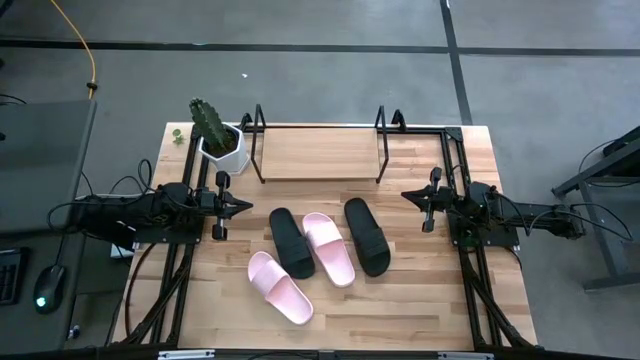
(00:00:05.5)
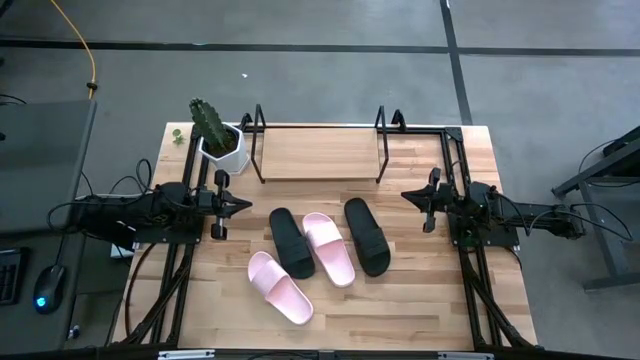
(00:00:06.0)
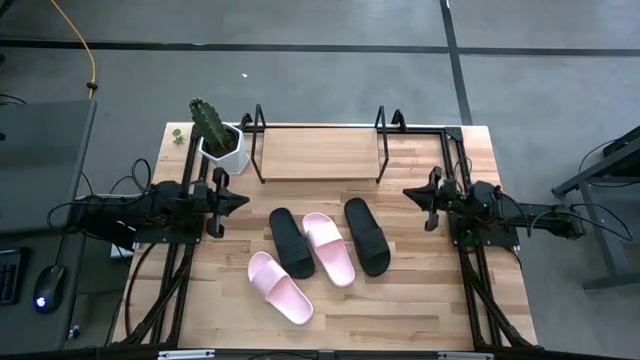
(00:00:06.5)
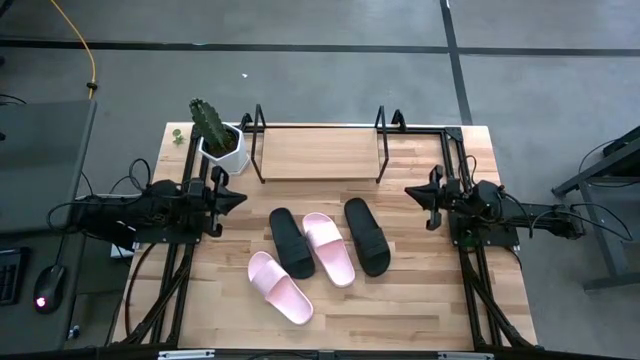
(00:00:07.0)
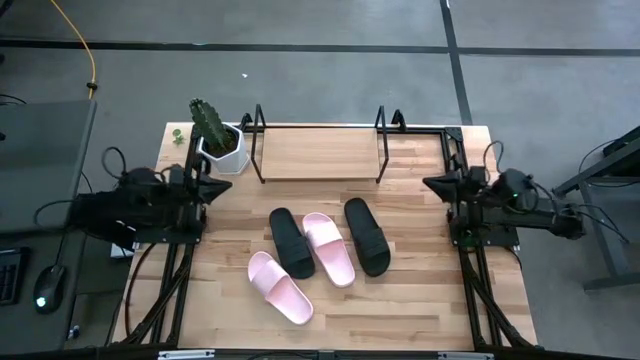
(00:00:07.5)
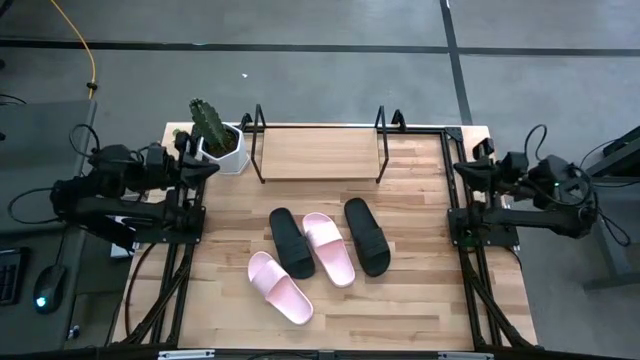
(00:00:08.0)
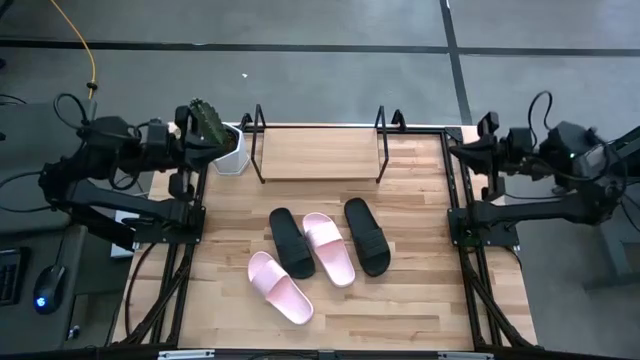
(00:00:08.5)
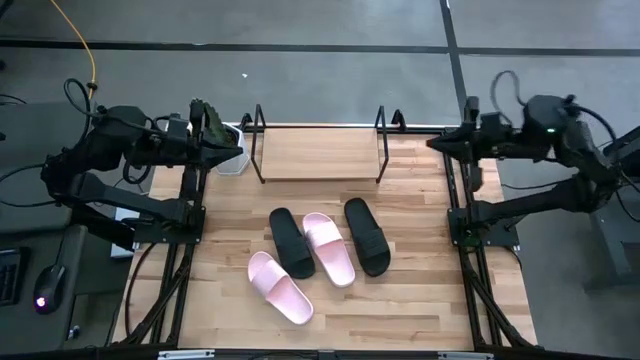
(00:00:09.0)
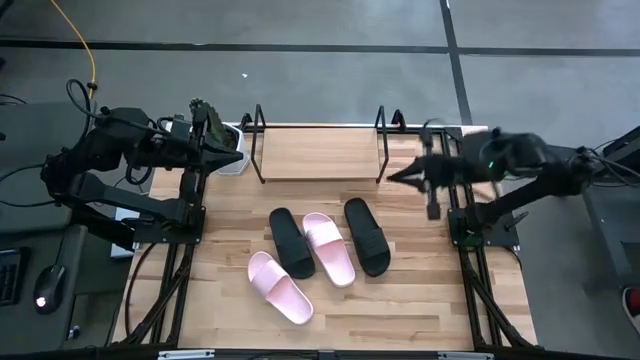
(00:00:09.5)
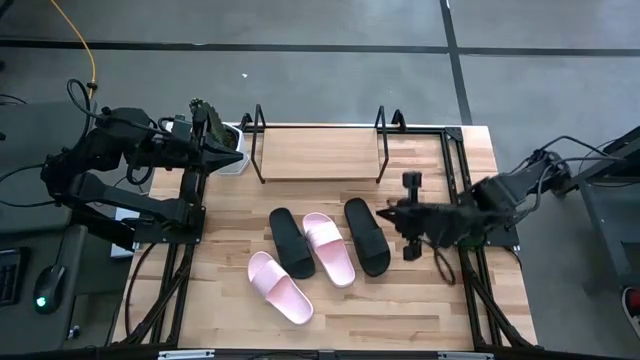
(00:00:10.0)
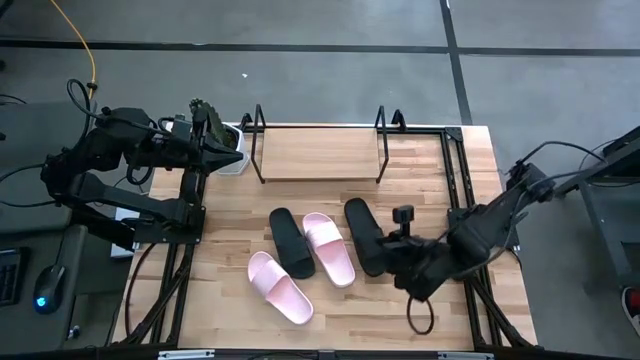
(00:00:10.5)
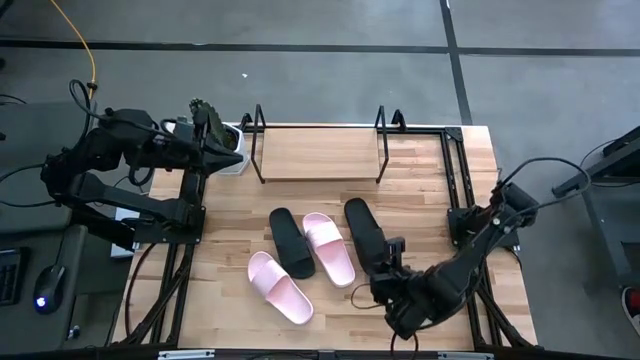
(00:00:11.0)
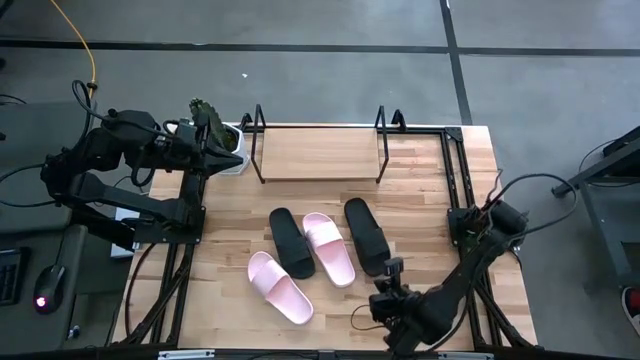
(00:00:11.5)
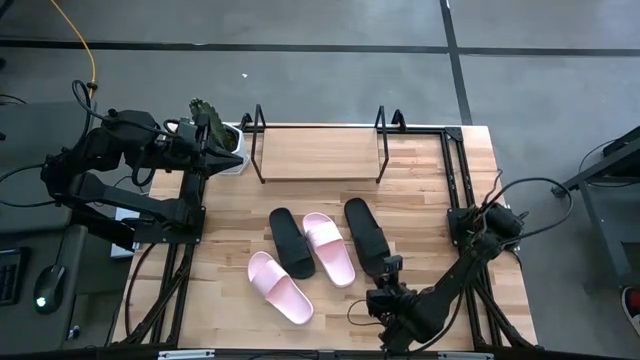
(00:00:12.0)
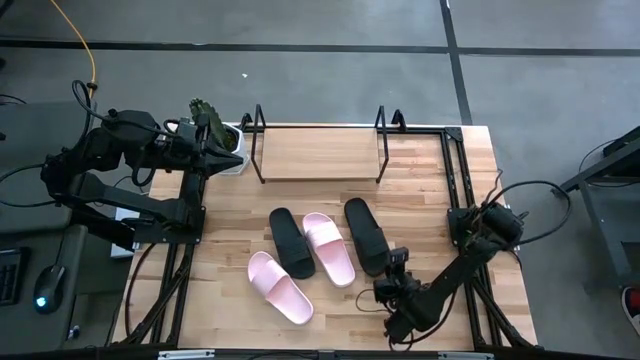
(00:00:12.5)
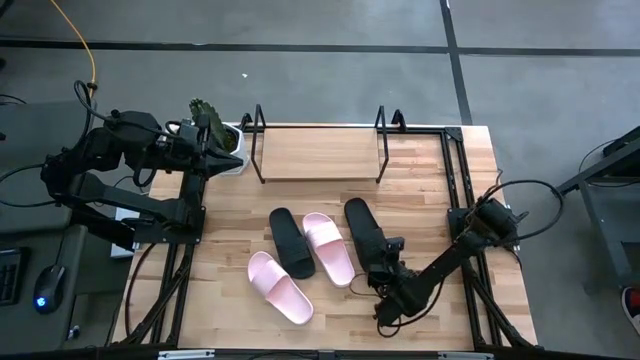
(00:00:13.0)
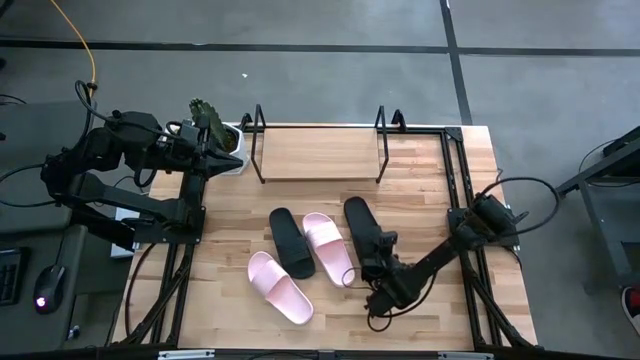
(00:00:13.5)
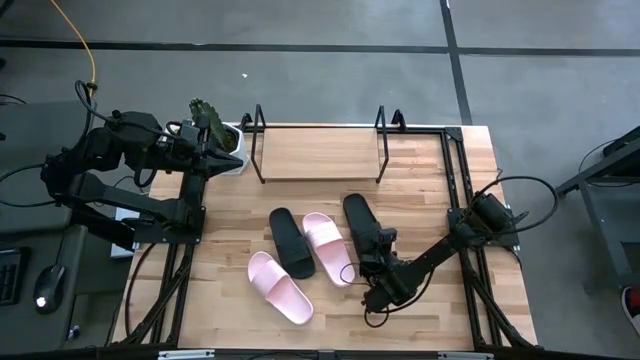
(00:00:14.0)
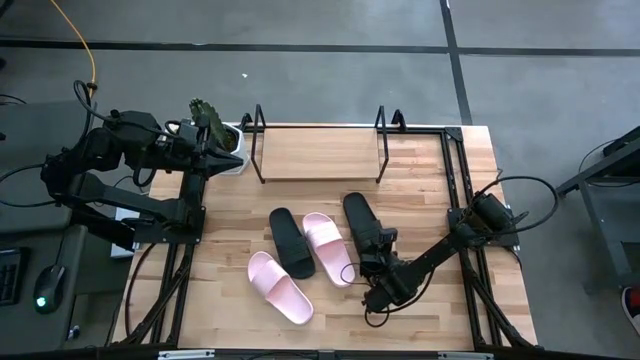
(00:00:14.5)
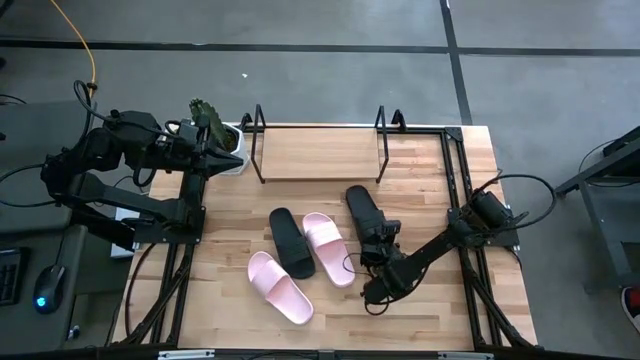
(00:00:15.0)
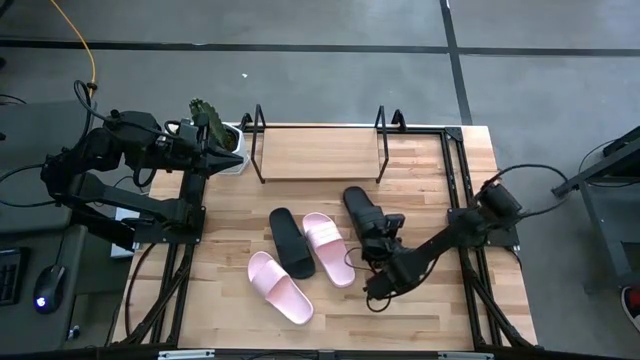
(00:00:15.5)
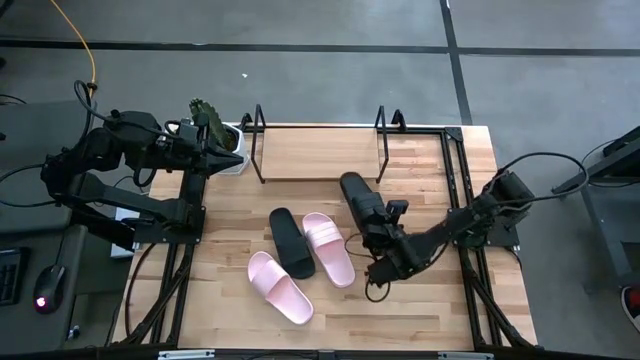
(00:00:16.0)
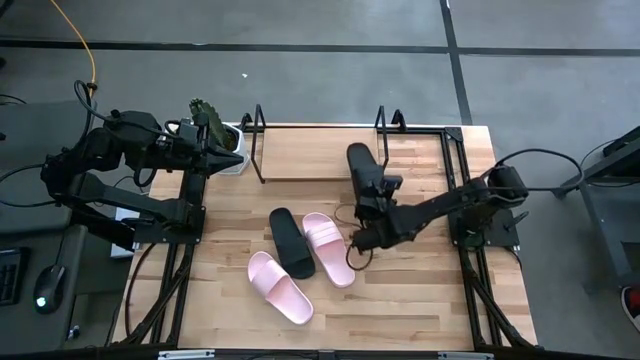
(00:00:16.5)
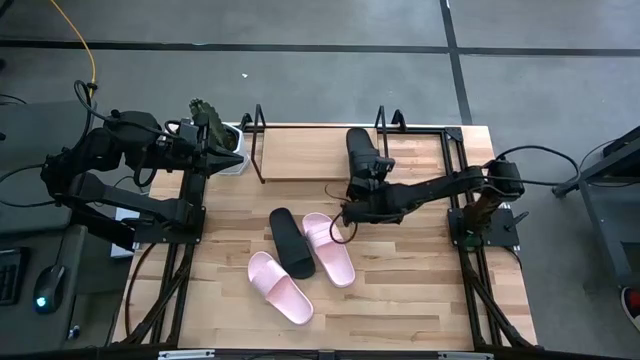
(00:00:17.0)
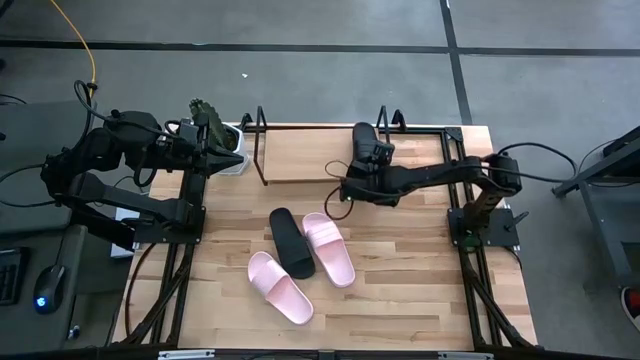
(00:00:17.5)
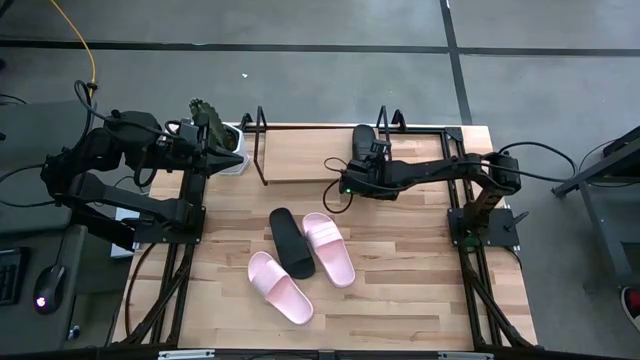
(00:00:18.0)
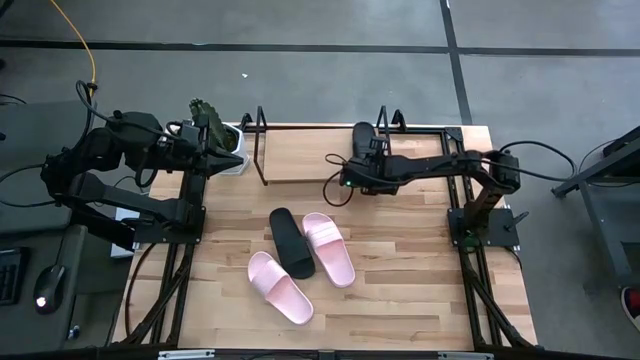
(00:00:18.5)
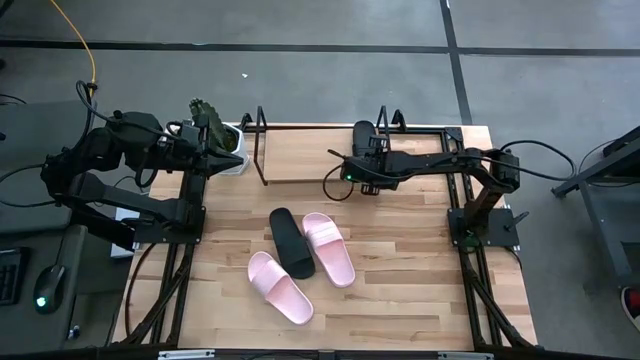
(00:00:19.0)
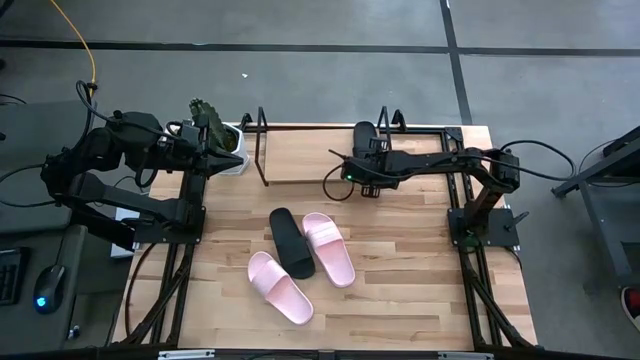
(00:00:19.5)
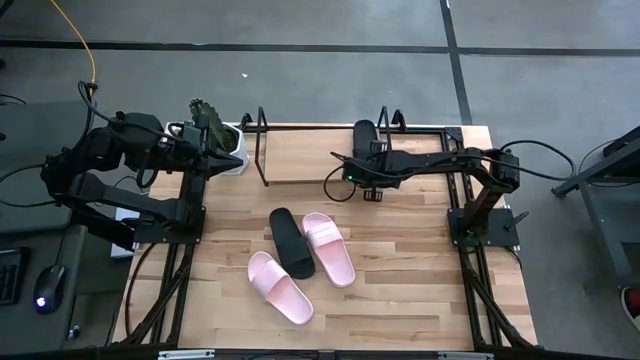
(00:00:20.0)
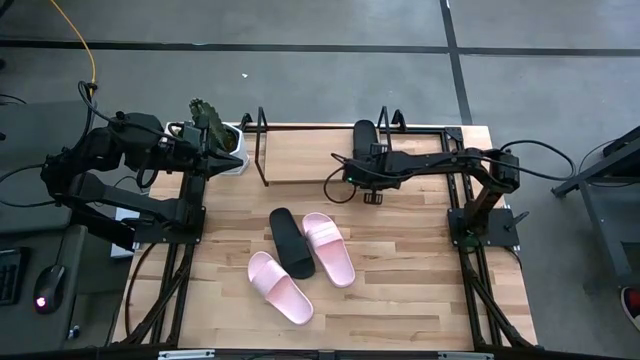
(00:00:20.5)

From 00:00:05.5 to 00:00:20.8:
Task: Pick and place slides into the shelf
Put the right black slides on the shelf

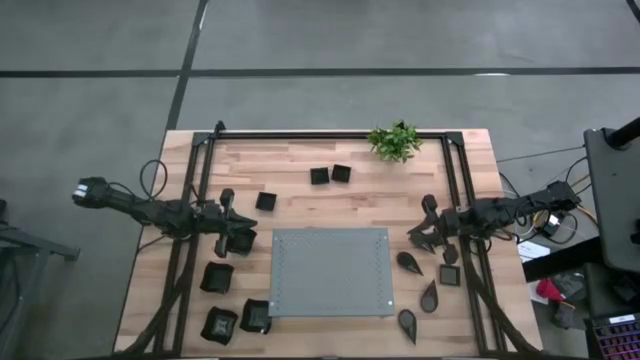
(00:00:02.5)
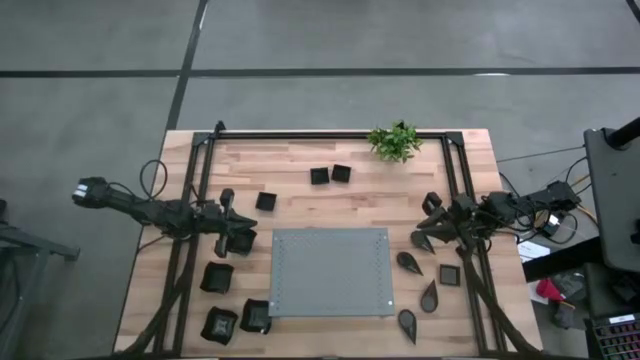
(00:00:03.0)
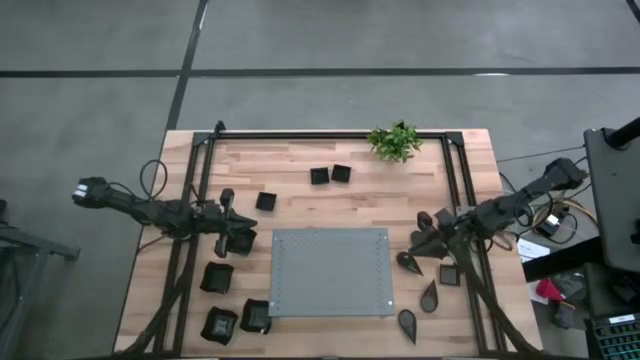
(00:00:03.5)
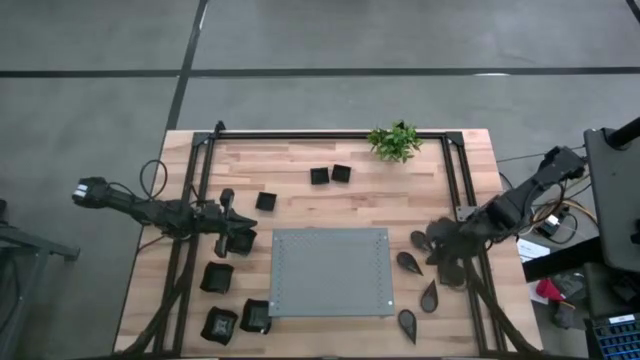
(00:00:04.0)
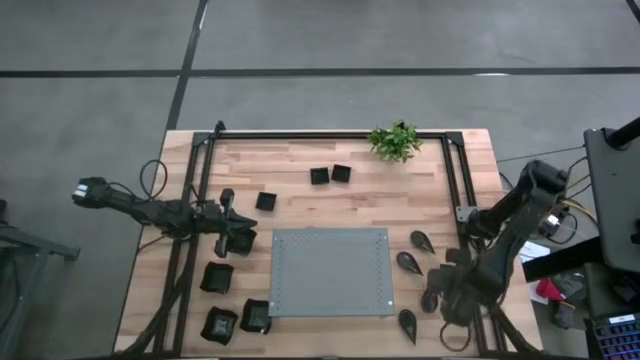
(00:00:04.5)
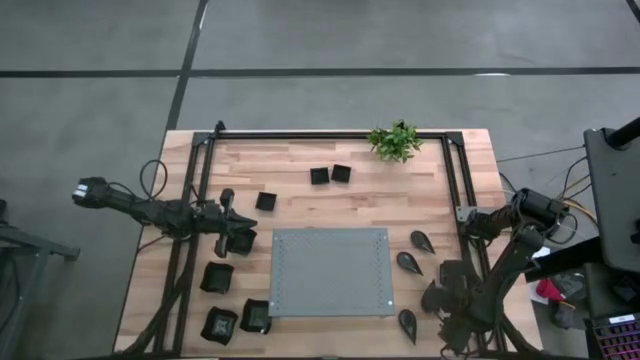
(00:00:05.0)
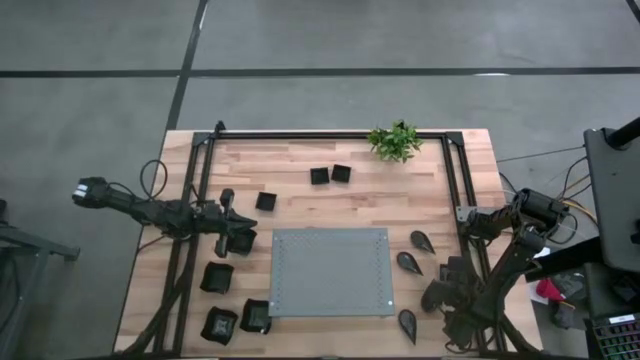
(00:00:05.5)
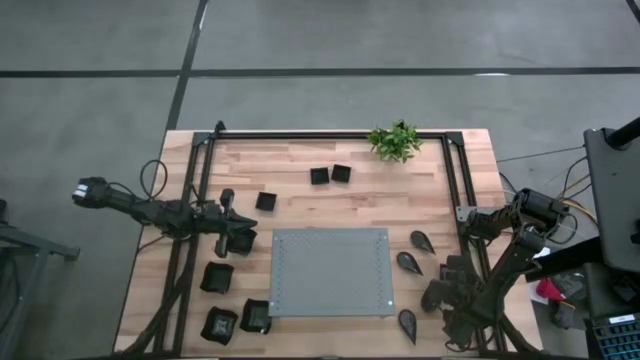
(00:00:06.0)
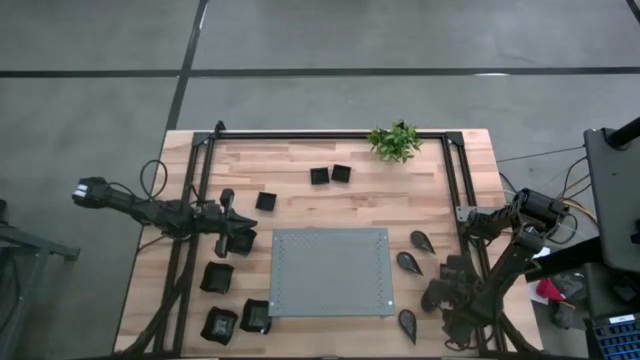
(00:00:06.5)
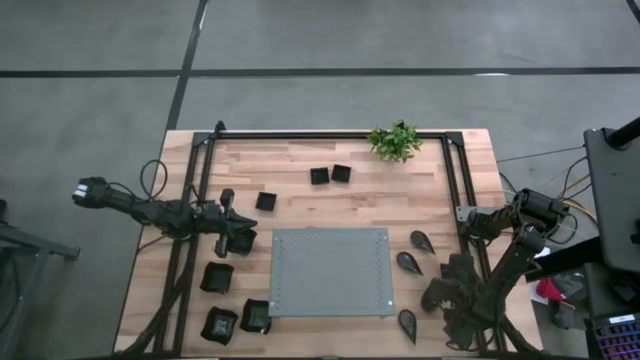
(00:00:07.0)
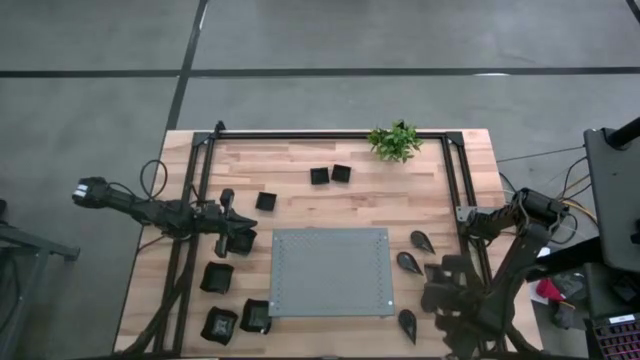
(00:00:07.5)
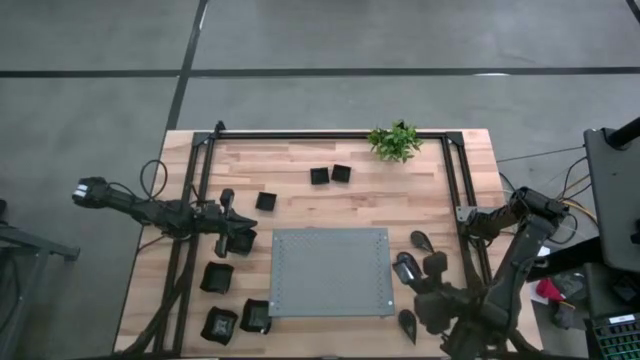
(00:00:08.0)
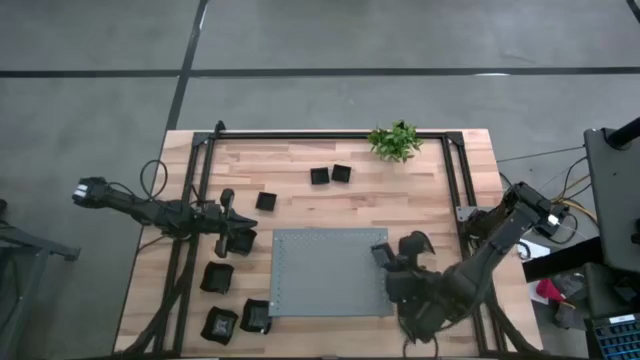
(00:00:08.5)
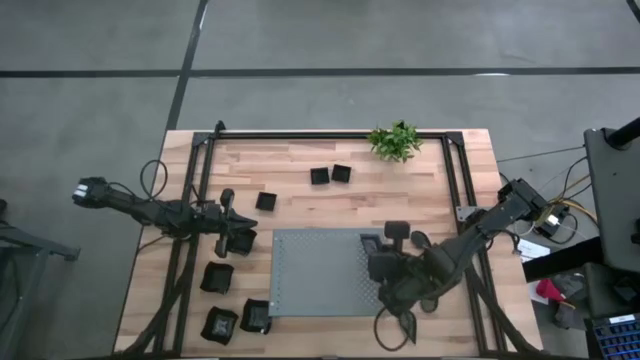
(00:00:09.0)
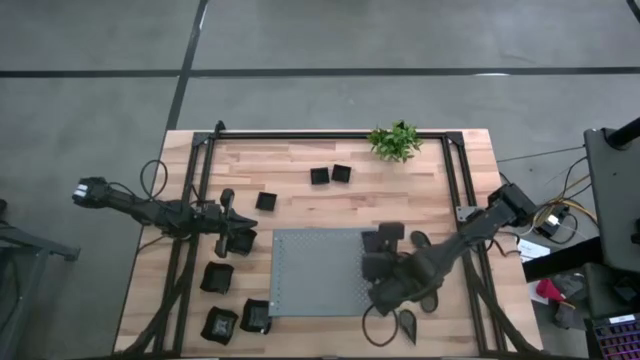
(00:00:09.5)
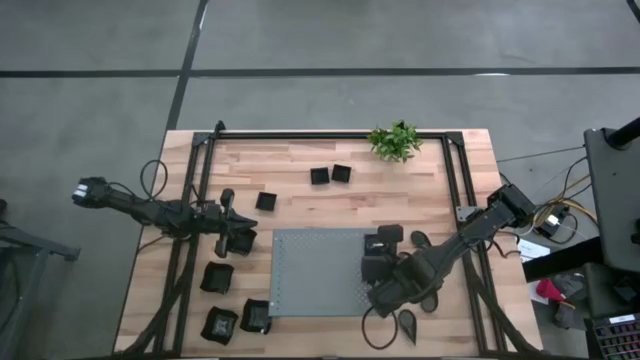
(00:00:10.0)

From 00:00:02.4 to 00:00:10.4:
Task: Pick & Place Mini shaped plates
Put the square plate on the shelf
